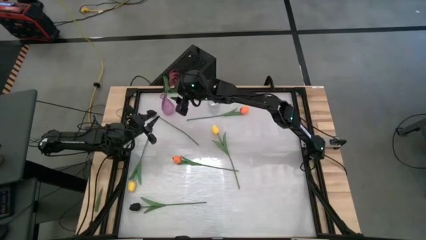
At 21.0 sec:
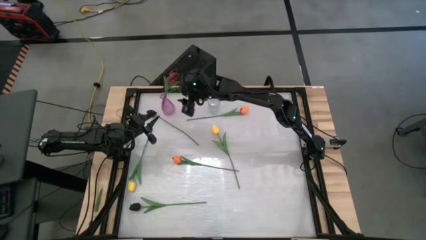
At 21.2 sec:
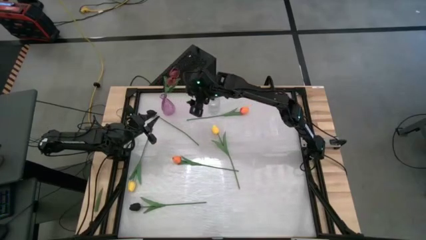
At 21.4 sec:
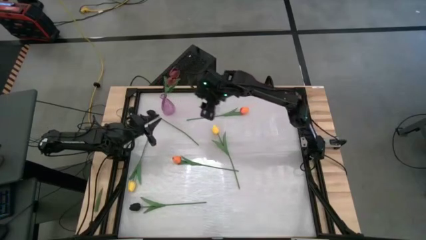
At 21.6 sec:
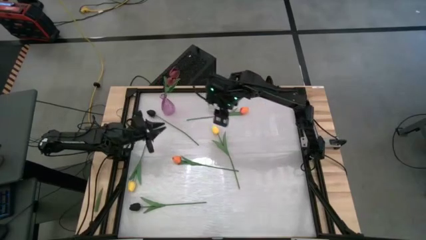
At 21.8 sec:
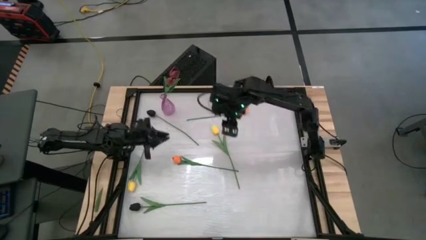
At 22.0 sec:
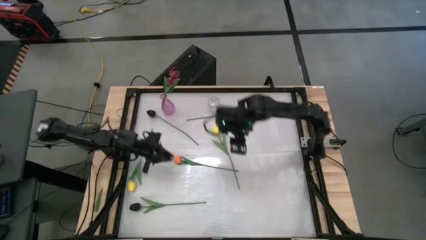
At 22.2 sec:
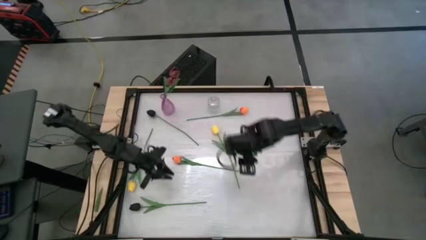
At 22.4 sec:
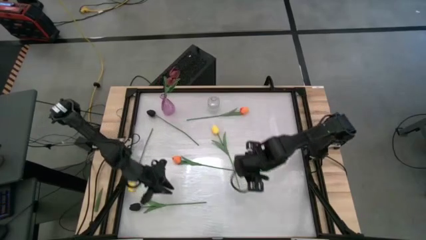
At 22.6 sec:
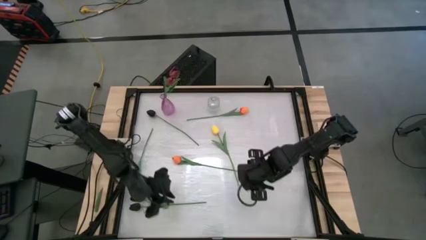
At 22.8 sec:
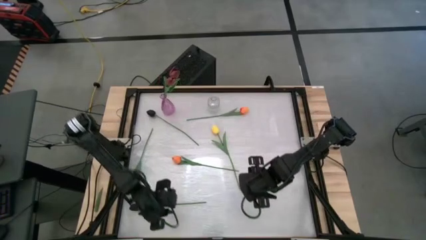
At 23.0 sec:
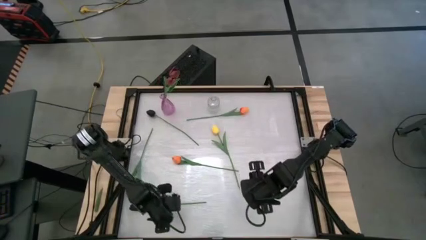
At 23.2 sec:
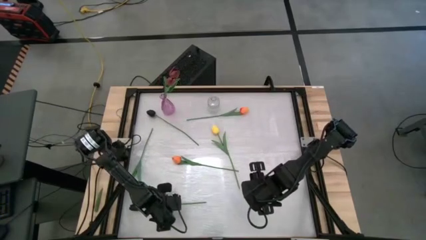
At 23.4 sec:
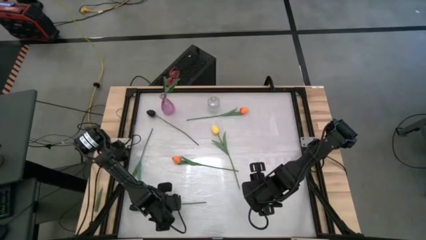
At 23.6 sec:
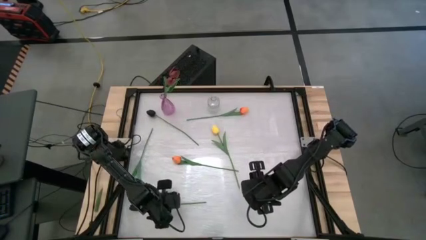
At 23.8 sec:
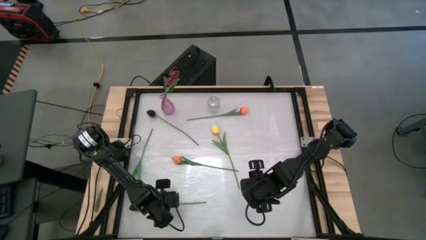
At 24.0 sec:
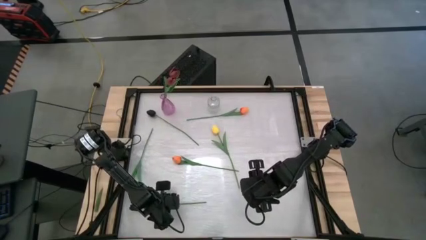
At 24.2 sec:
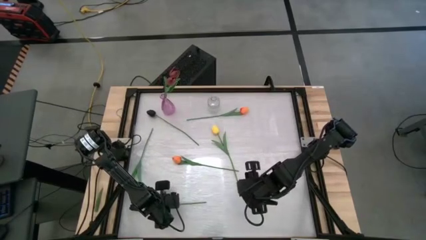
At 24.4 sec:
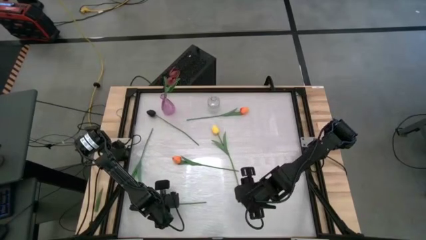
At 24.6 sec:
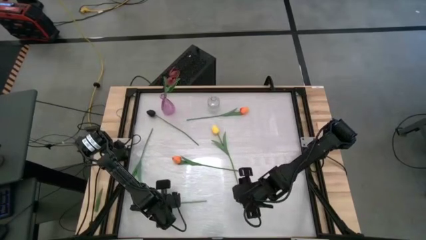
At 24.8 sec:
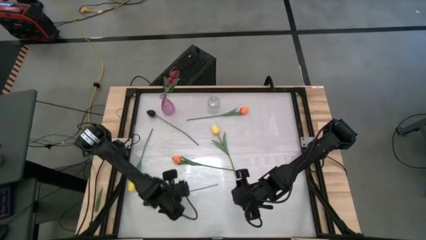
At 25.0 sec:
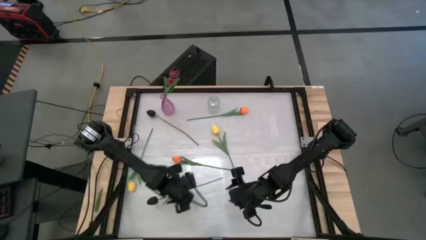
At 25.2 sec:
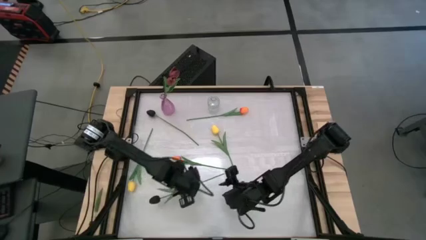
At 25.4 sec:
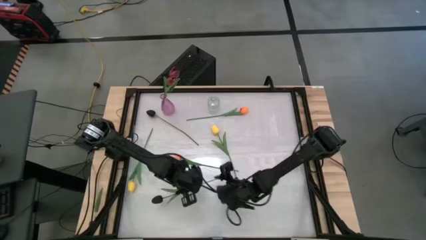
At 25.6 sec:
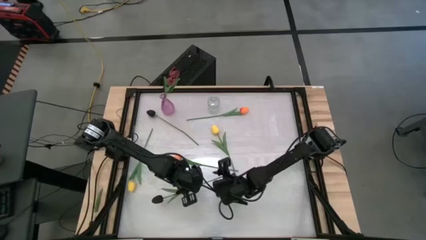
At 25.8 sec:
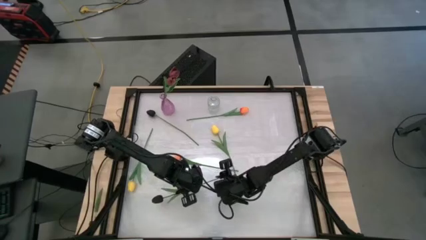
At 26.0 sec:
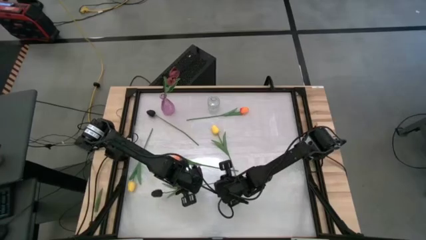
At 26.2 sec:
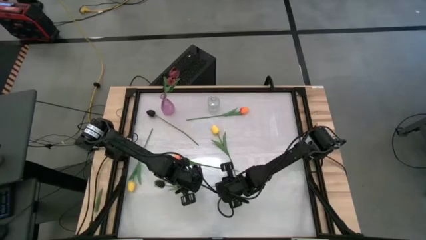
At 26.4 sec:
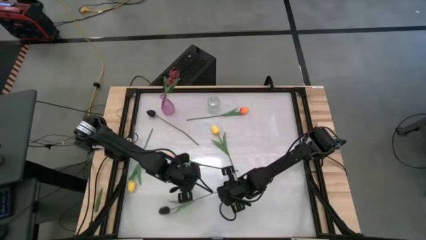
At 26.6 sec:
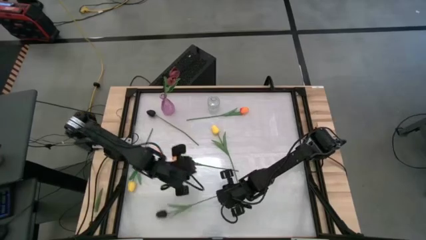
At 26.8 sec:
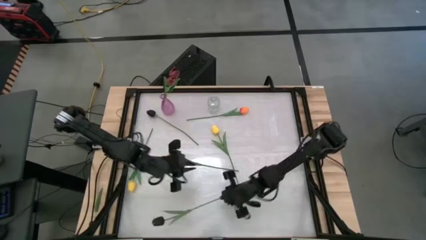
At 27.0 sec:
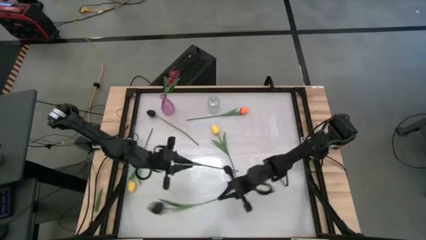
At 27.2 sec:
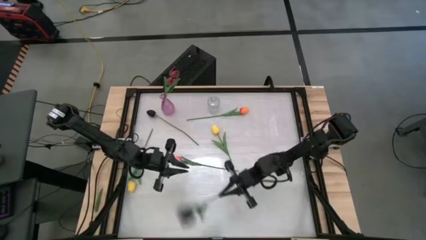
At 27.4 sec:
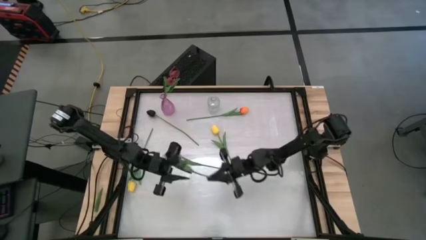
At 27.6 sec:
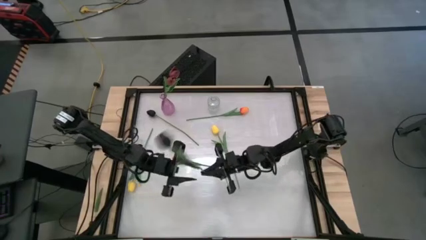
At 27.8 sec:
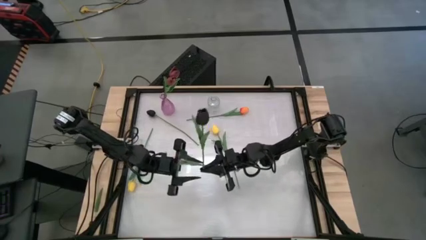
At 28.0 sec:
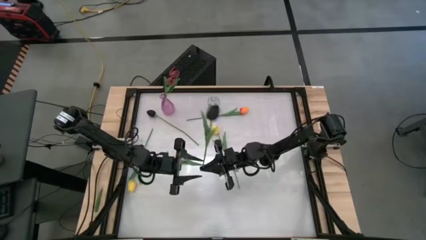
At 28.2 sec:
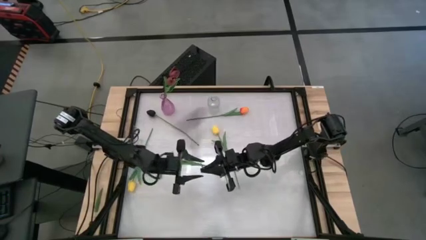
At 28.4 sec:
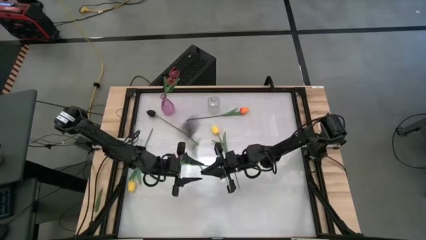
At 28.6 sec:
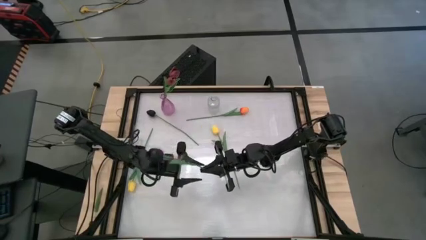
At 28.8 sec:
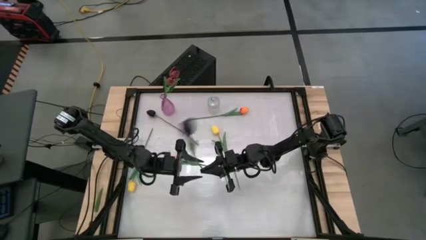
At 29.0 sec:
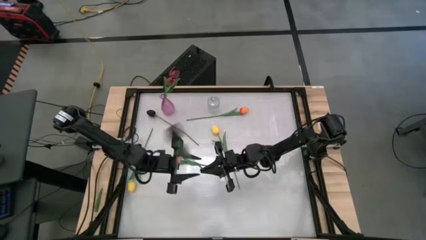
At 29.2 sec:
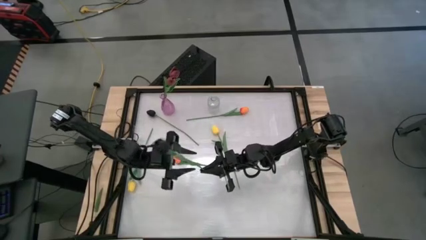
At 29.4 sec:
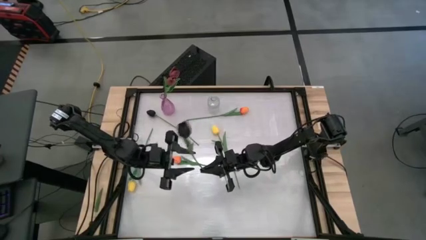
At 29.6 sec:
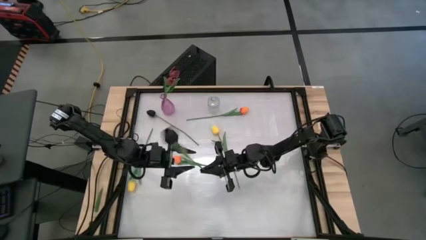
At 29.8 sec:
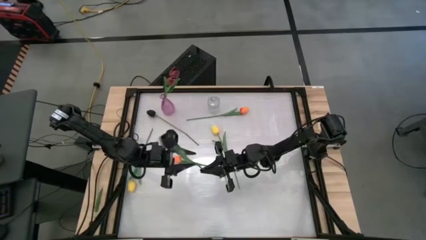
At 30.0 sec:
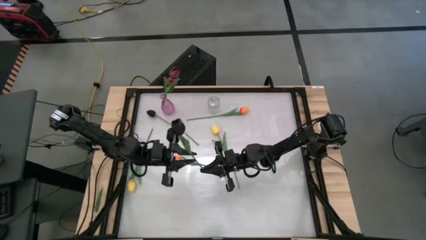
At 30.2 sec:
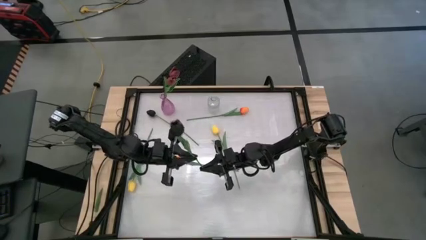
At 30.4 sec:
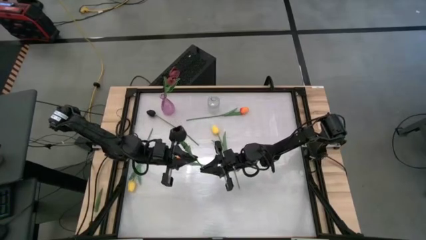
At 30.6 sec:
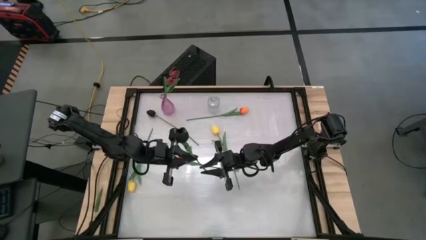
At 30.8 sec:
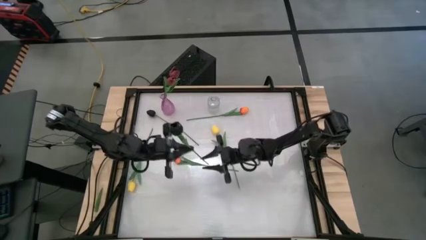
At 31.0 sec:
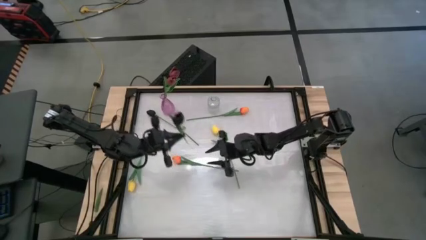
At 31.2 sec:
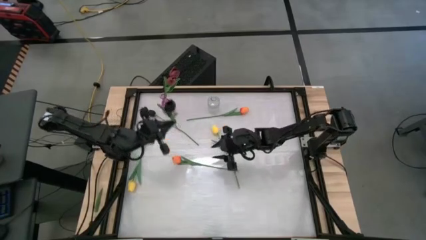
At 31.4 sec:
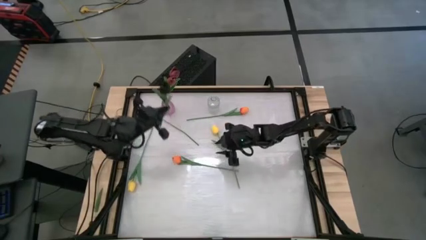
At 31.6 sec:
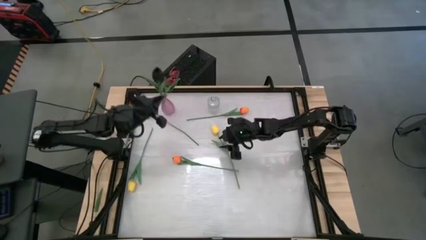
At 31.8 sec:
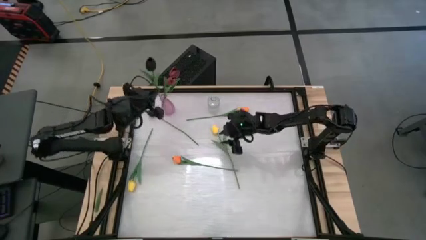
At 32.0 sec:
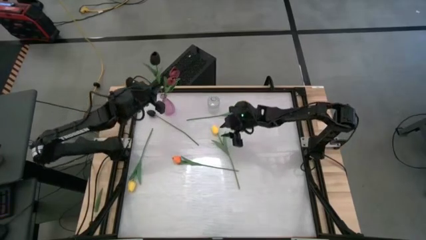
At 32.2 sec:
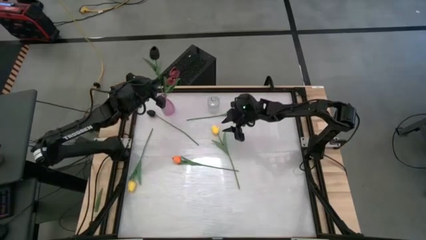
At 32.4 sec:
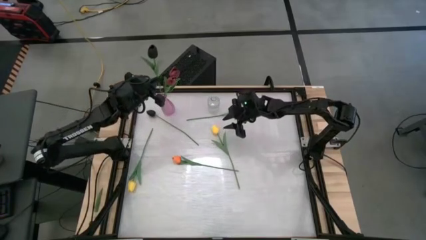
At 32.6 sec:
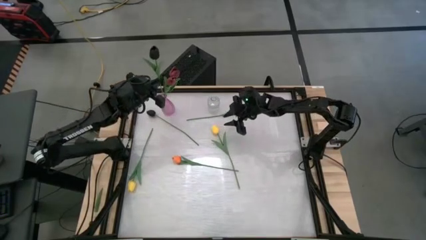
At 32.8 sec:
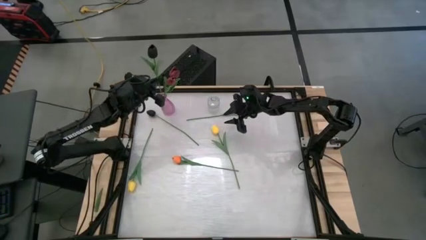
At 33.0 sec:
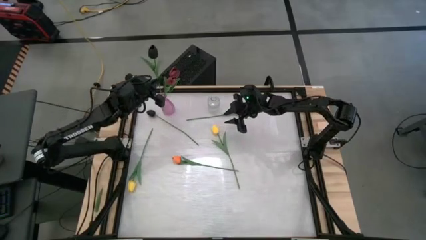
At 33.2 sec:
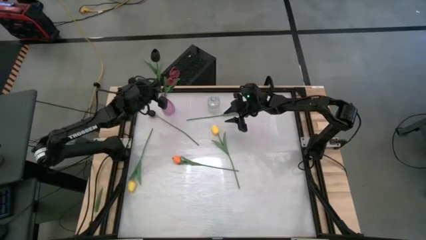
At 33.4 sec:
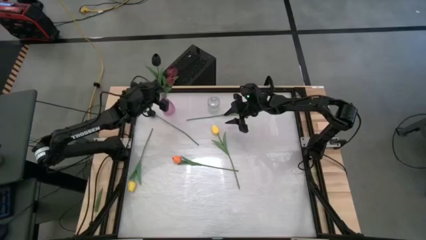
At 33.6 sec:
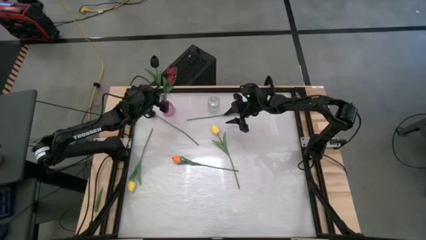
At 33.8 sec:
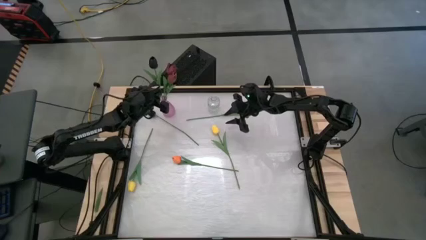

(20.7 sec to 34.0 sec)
Task: Sort flowers into vase by color
Put the bottom black flower into the purple vase

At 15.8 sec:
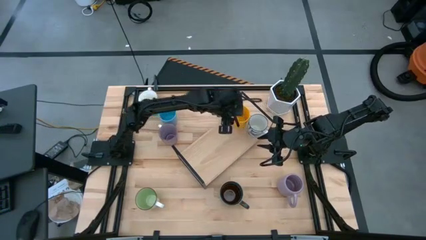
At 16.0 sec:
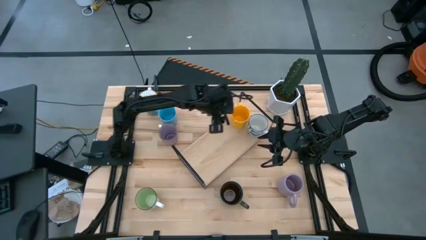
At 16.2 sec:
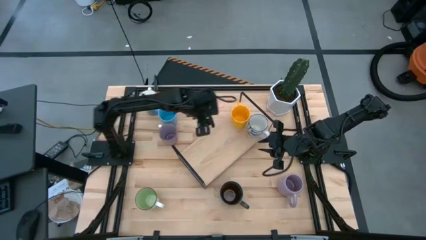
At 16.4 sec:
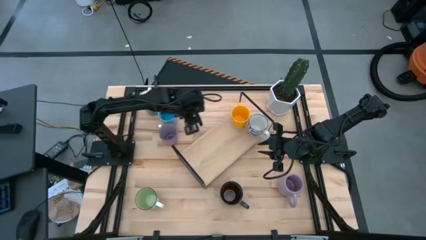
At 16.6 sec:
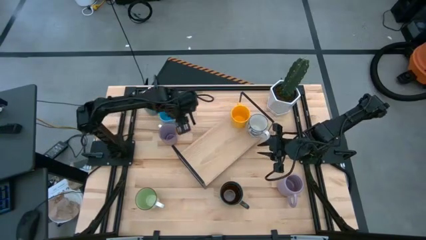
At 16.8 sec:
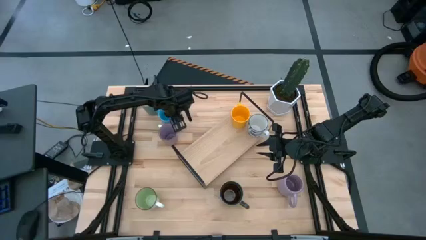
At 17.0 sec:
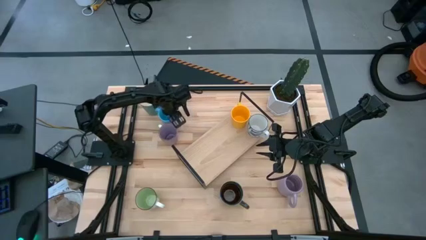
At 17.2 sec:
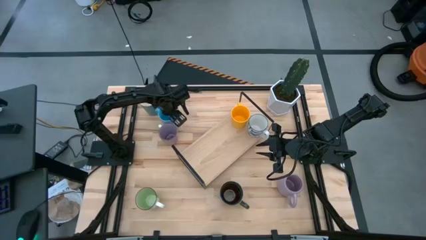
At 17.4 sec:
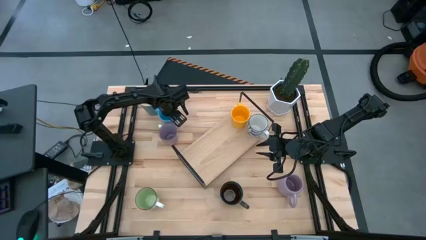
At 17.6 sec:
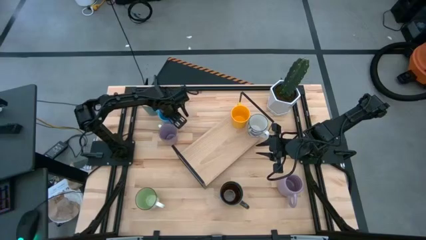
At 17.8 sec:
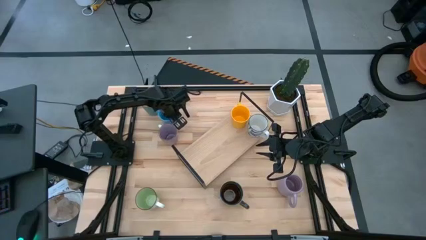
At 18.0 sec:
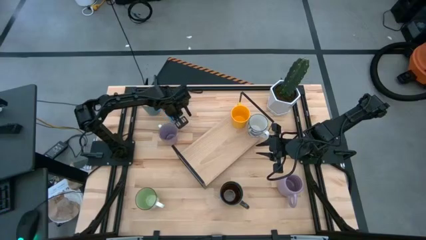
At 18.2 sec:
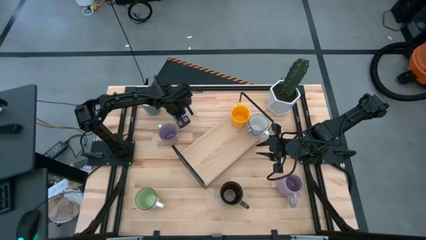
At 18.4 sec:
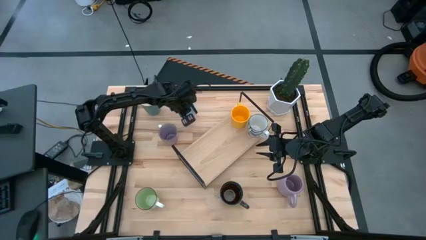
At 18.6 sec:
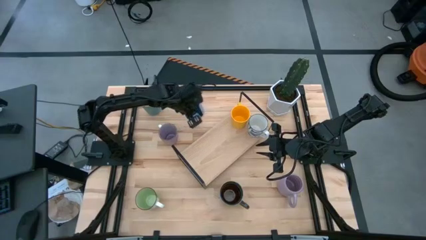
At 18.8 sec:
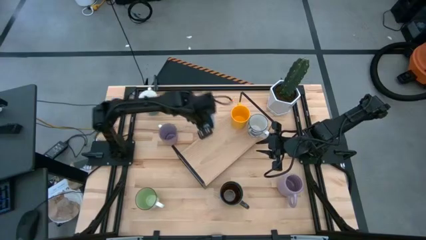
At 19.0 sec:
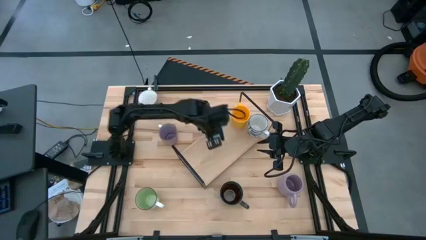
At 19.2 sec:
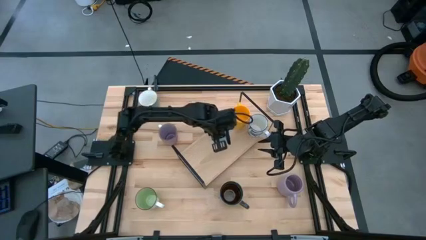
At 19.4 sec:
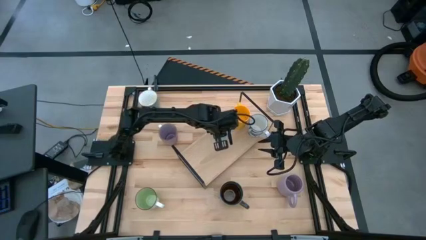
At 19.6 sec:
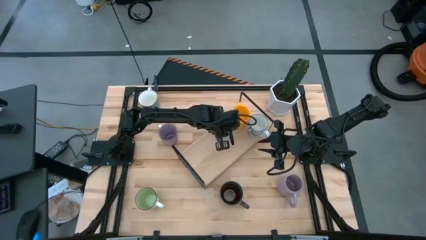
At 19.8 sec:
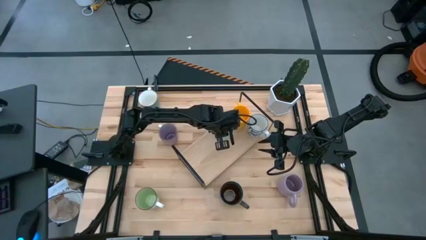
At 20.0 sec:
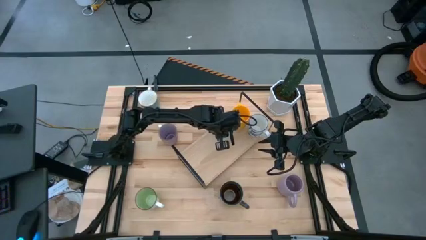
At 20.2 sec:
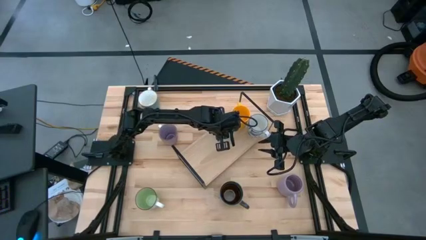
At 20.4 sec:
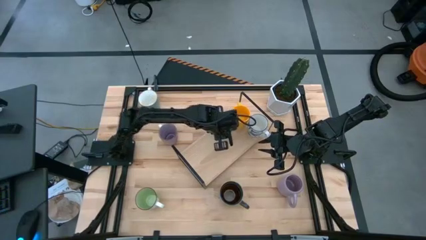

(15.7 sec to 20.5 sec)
Task: Place coffee mugs
Put the blue mug onto the shelf
